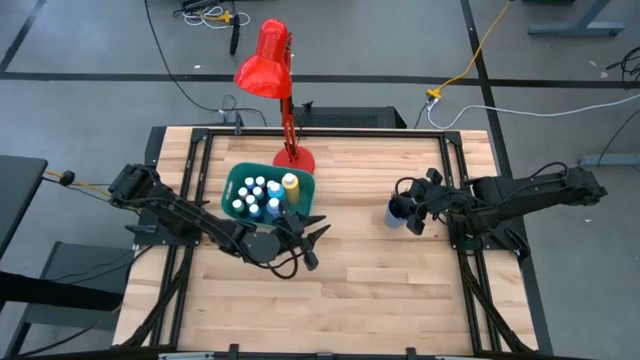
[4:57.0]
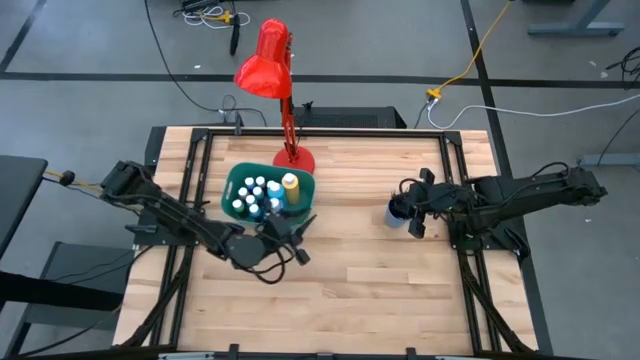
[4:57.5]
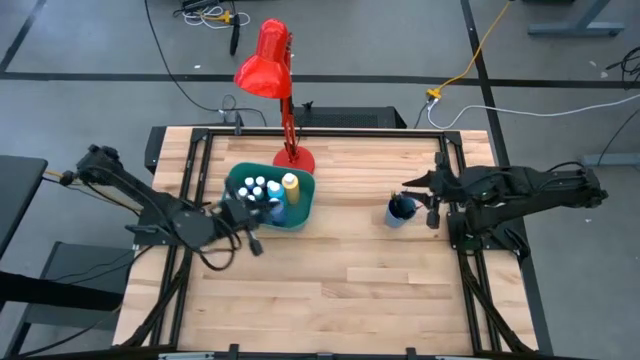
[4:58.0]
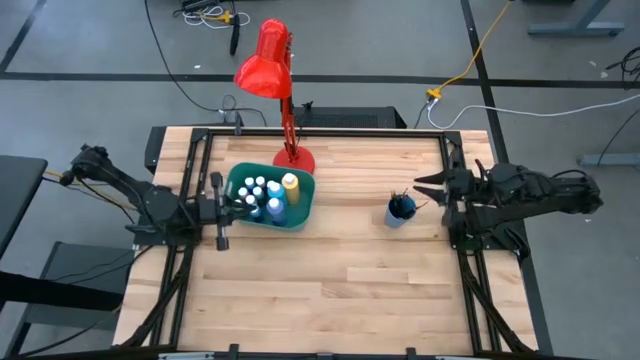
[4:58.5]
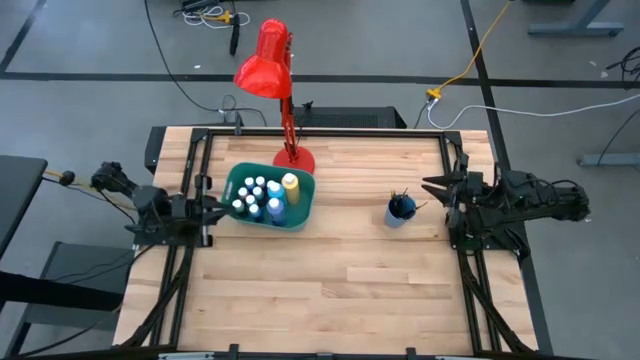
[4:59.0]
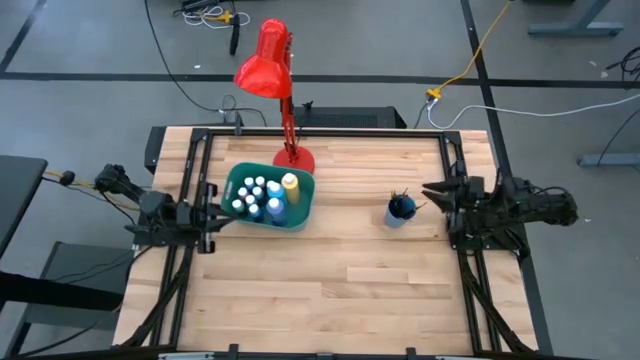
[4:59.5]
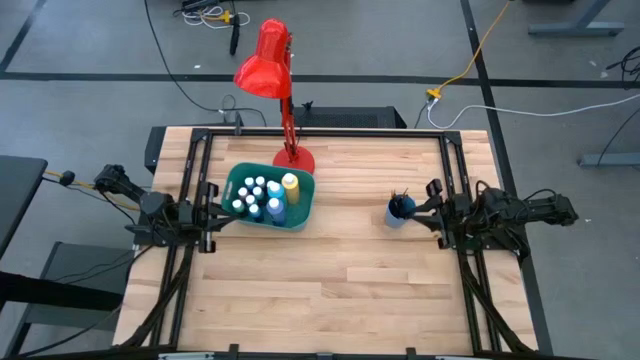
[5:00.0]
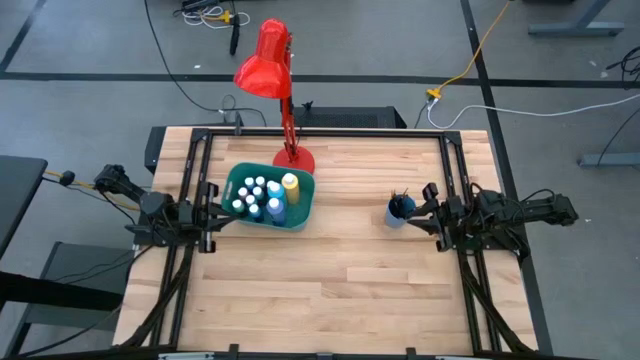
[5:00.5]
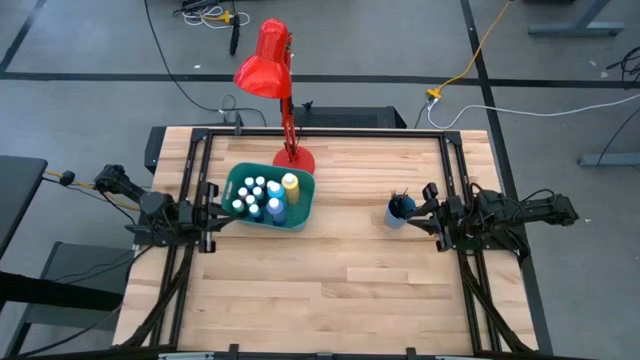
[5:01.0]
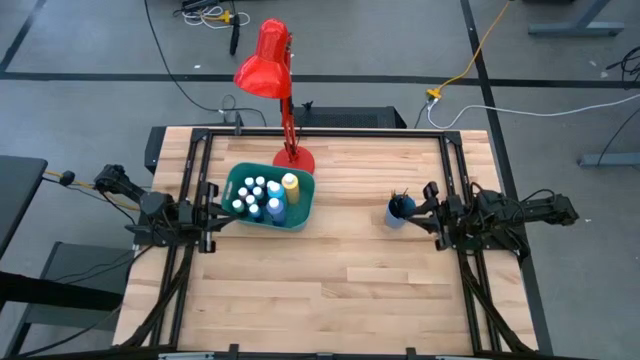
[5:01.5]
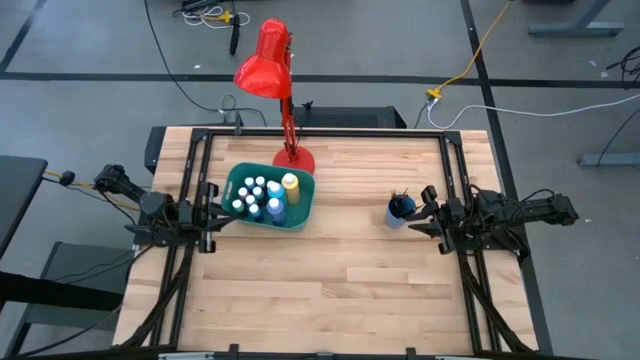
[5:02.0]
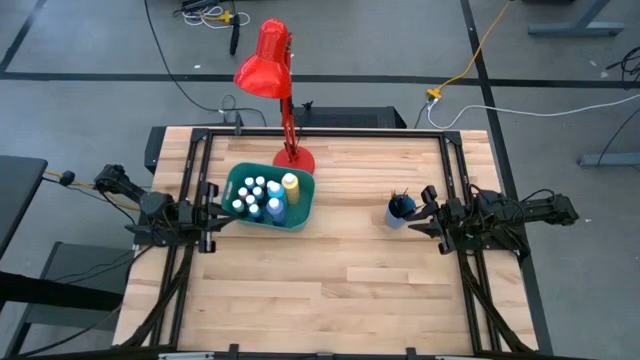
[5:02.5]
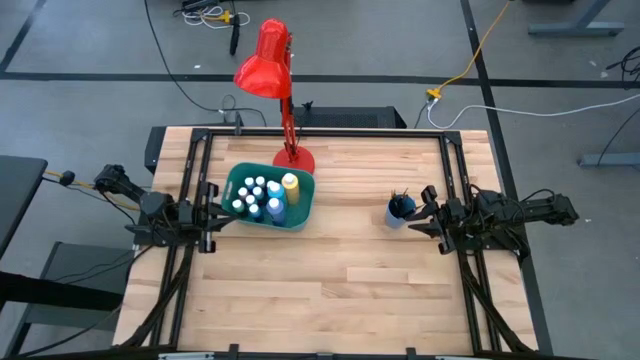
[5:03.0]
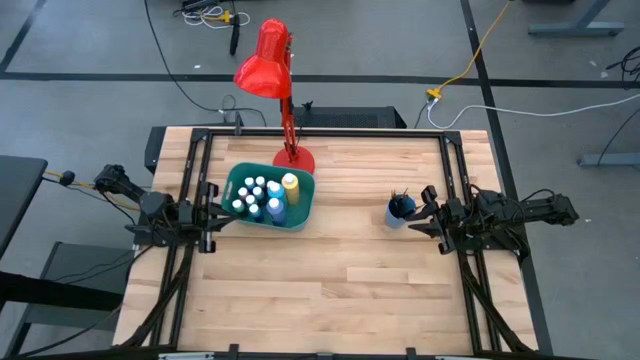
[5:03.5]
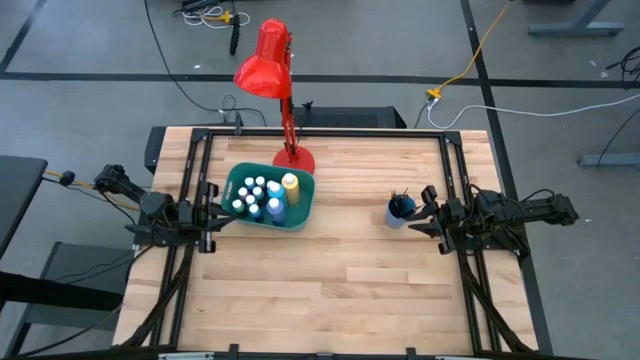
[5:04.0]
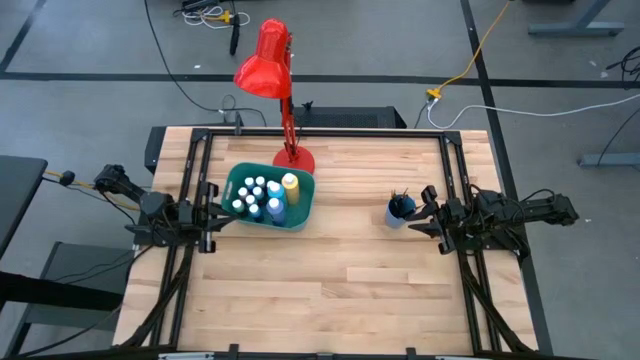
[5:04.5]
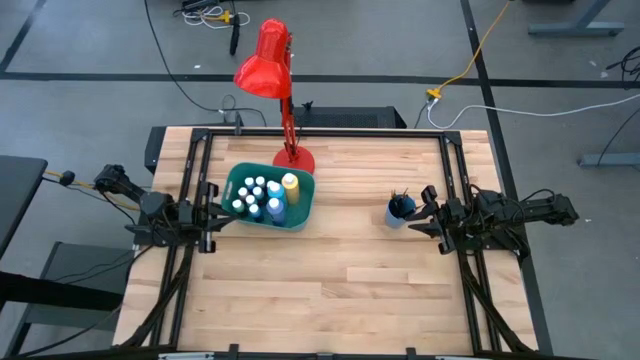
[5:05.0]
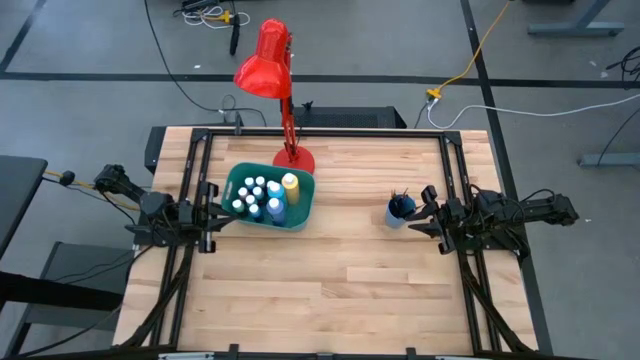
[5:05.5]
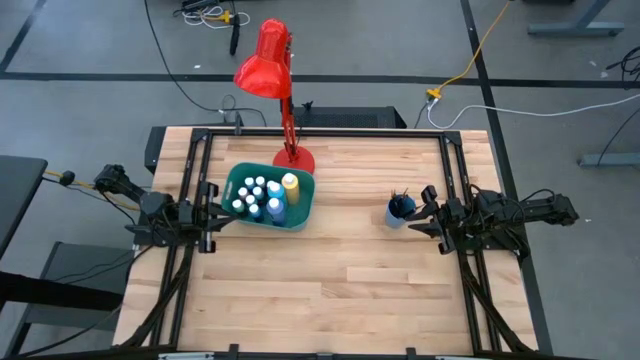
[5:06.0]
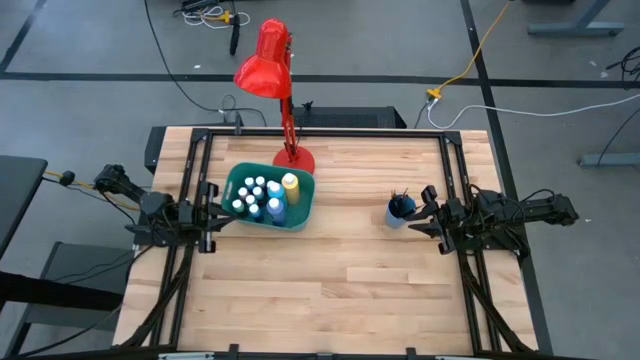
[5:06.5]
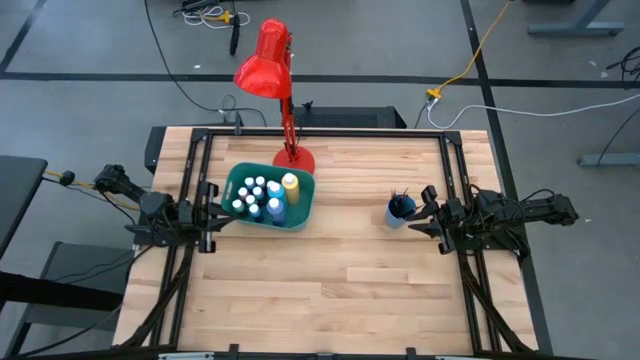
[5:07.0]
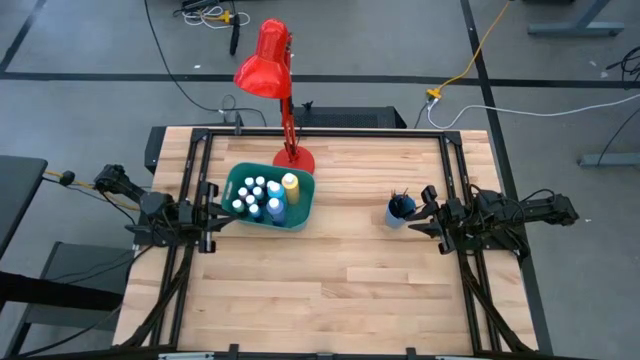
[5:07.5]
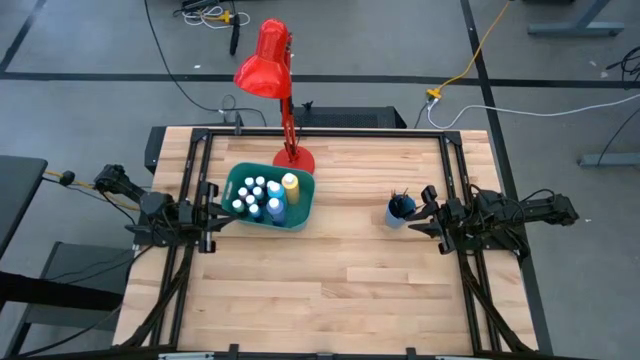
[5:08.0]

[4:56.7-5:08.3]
Task: Pick & Place Paint Supplies
Return to Home Position

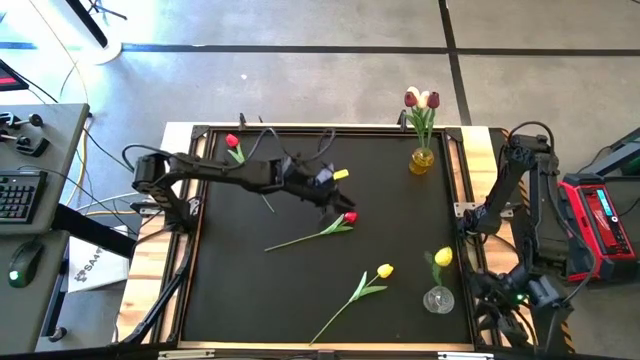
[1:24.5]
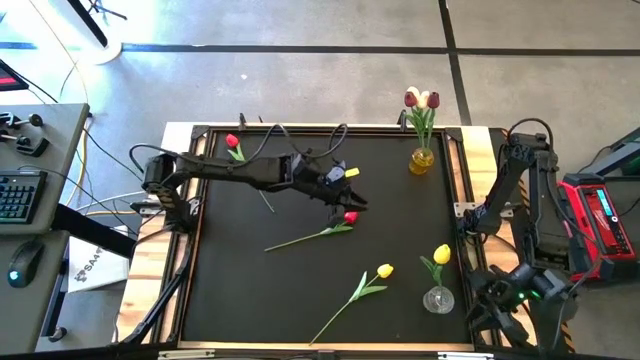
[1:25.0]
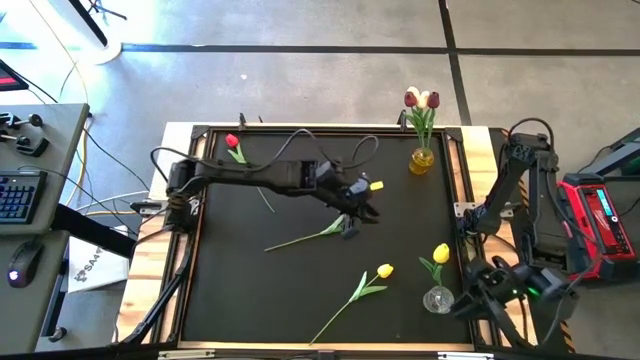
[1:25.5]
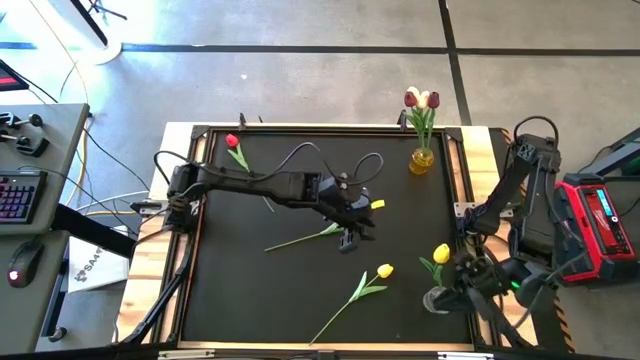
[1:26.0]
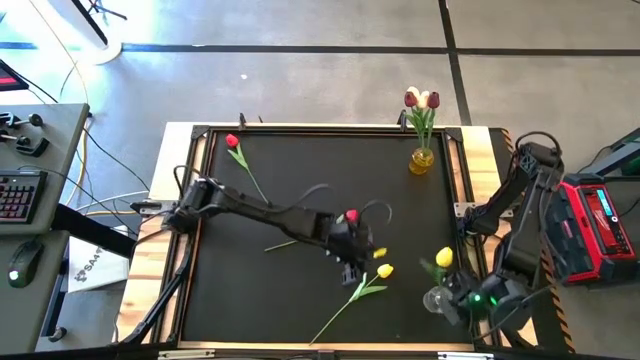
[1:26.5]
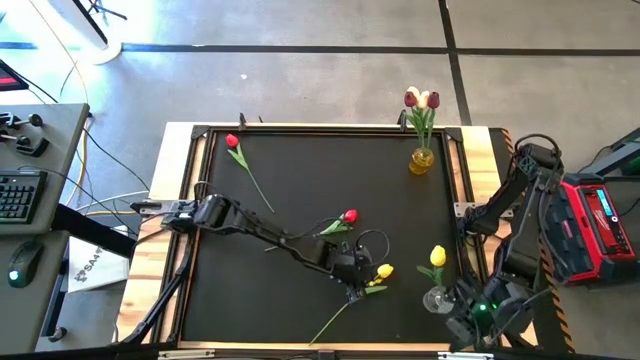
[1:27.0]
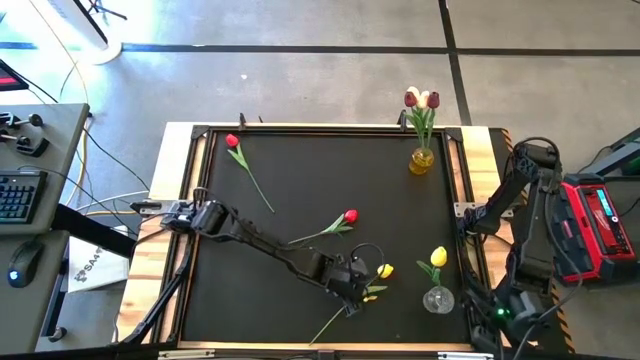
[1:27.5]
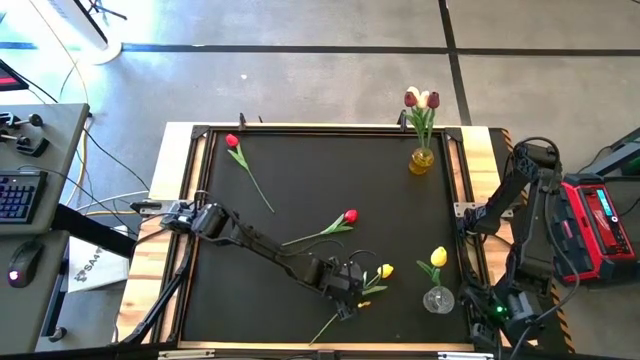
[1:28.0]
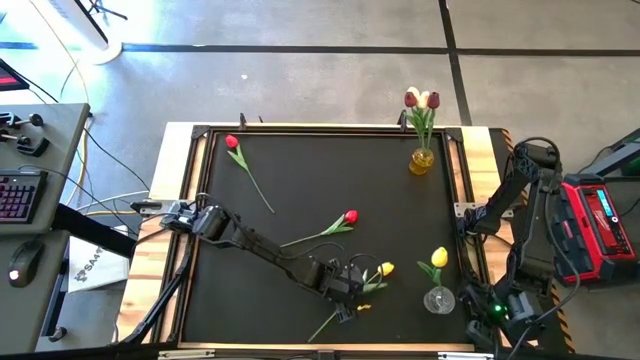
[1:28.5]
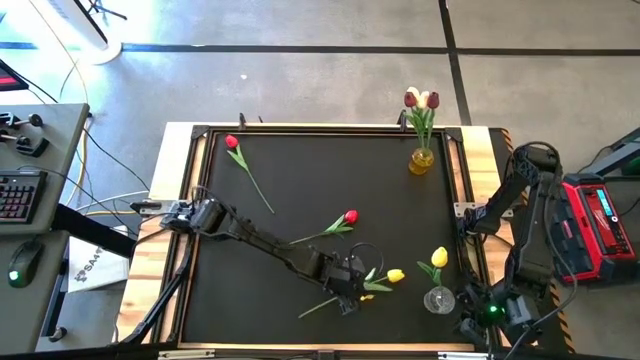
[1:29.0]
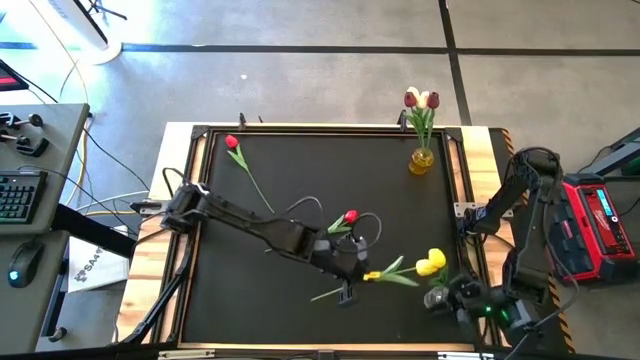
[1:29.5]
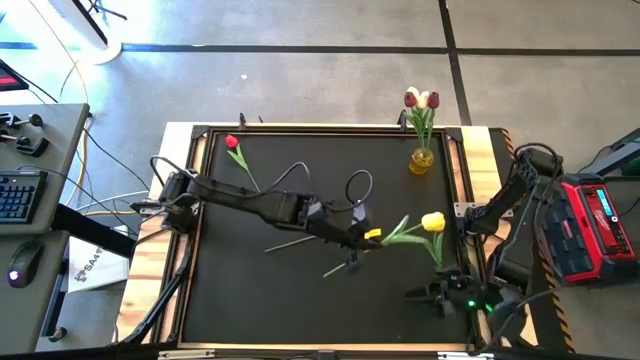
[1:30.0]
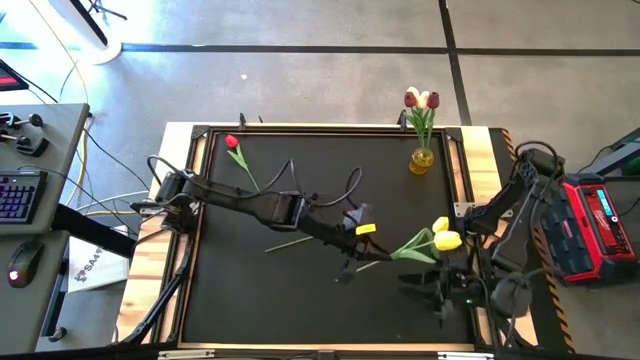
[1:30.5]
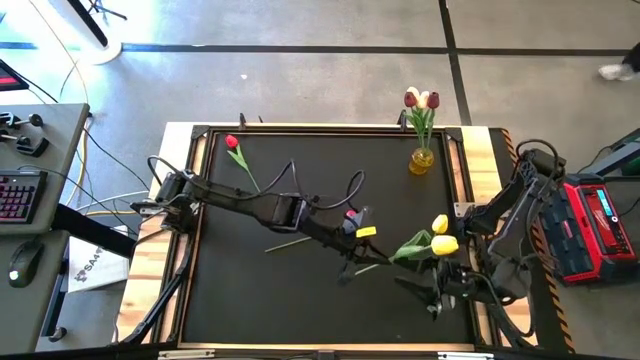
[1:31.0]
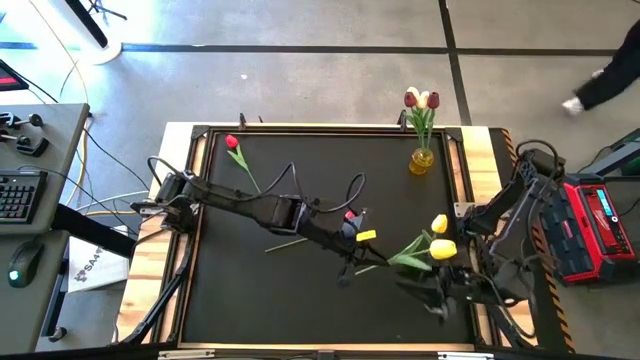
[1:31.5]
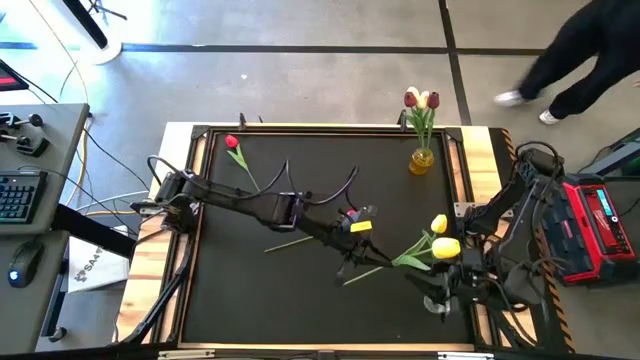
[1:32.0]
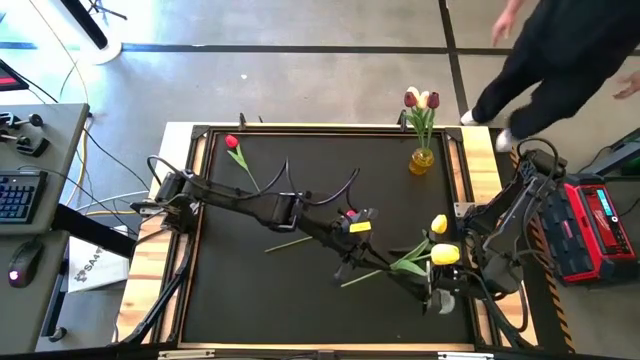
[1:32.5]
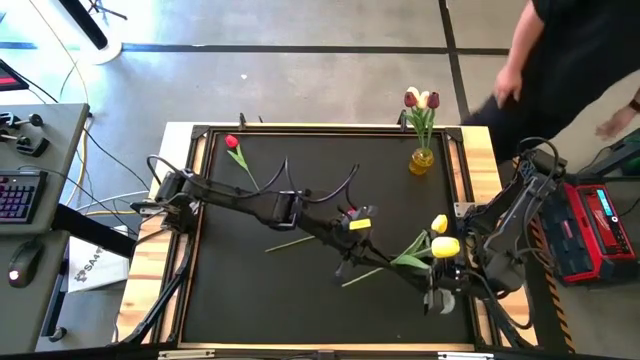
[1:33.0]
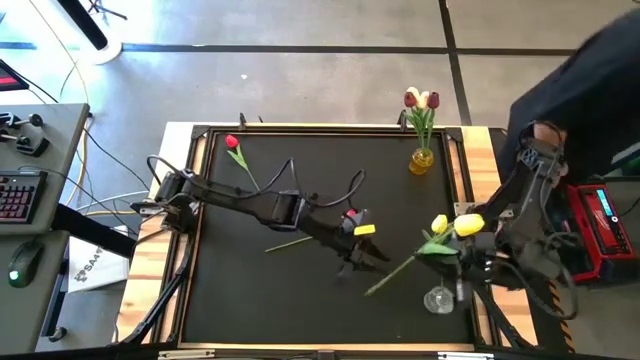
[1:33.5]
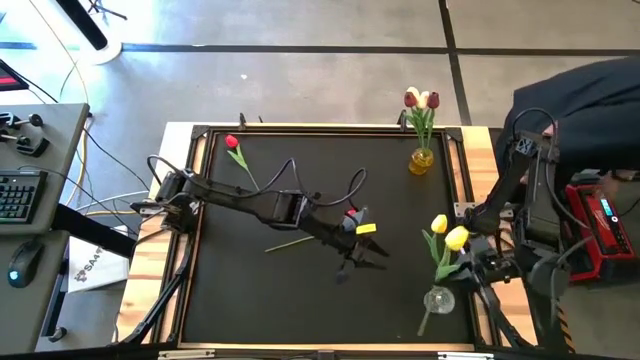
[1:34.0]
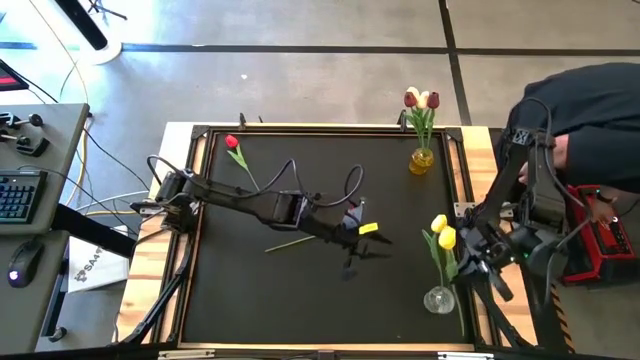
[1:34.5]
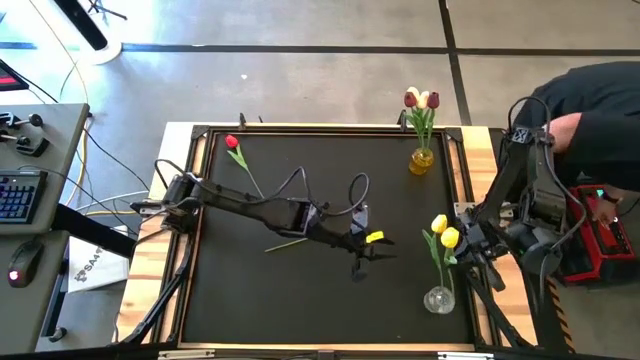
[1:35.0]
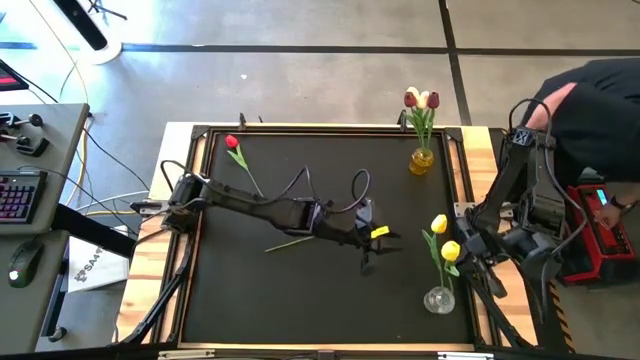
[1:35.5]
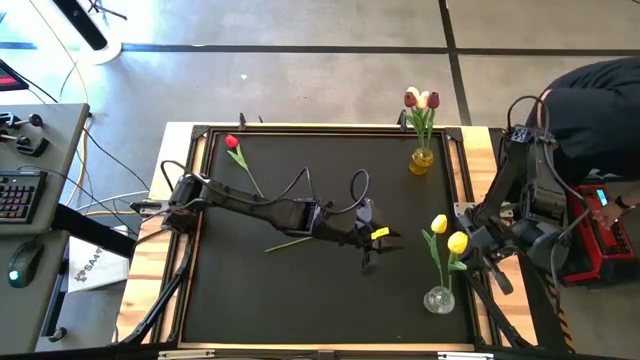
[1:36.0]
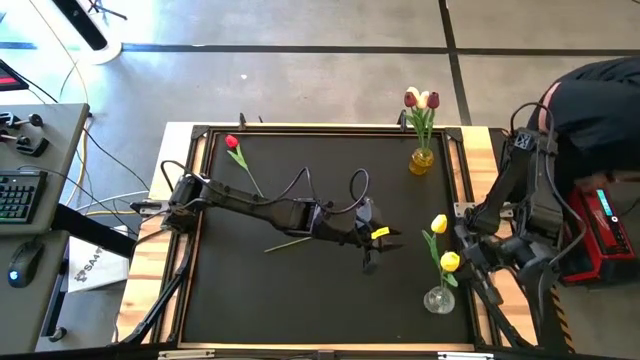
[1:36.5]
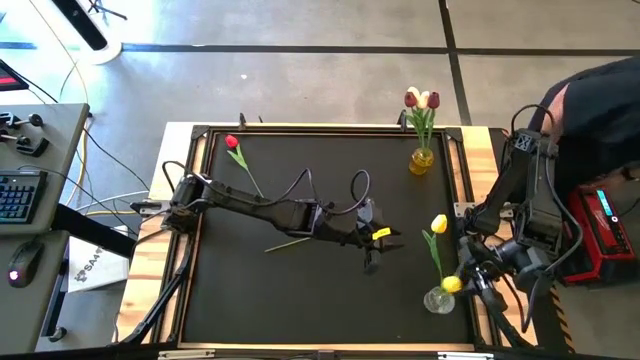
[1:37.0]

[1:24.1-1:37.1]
Task: Sort flowers into vase by color
Put the yellow flower into the transparent flower vase
